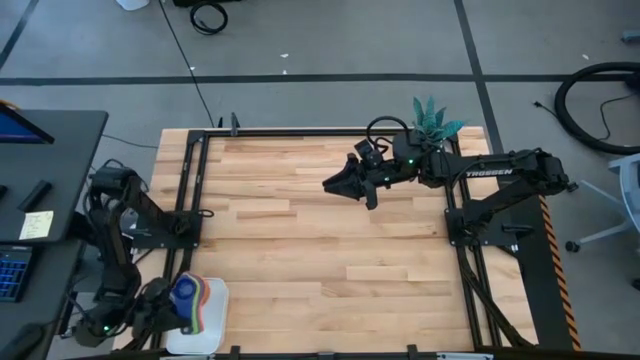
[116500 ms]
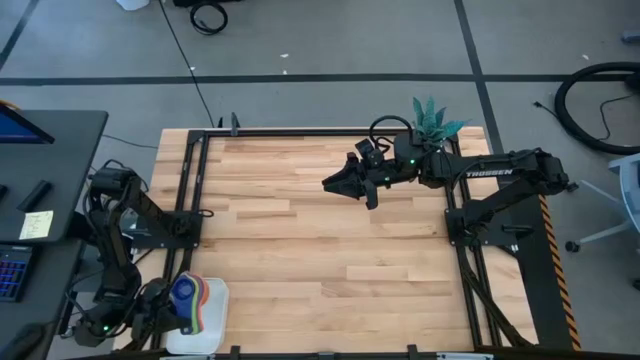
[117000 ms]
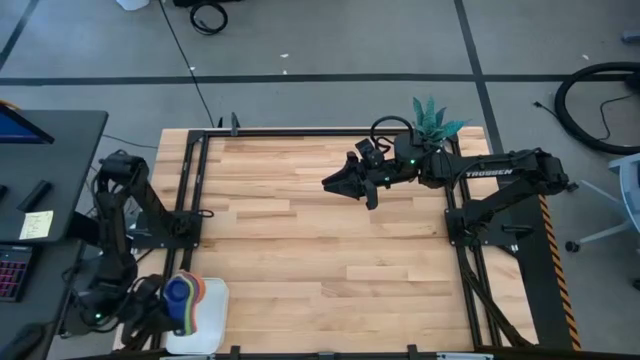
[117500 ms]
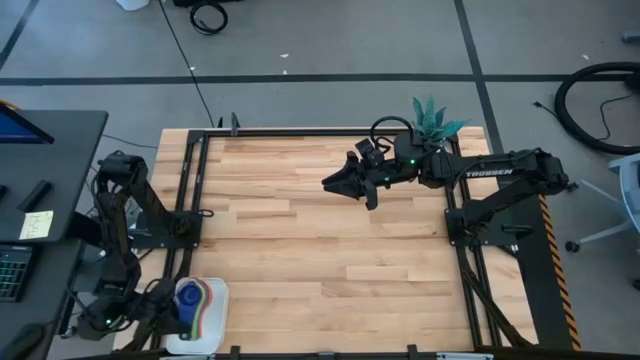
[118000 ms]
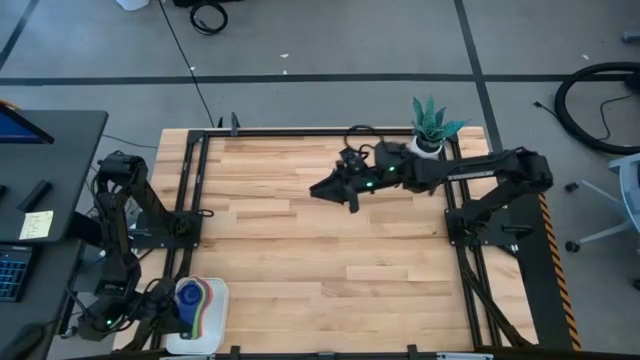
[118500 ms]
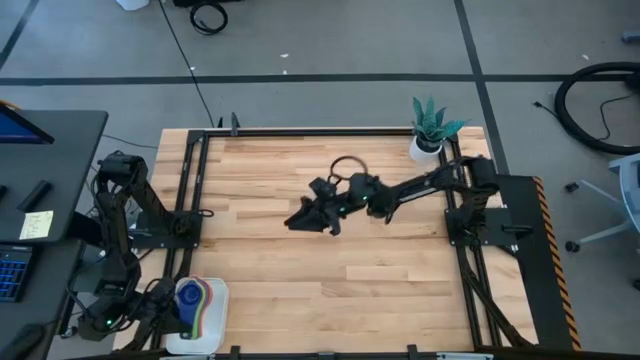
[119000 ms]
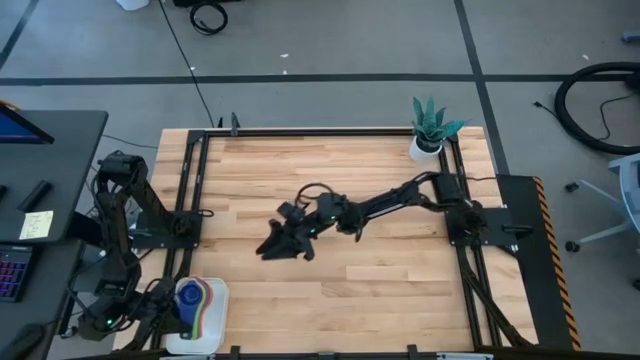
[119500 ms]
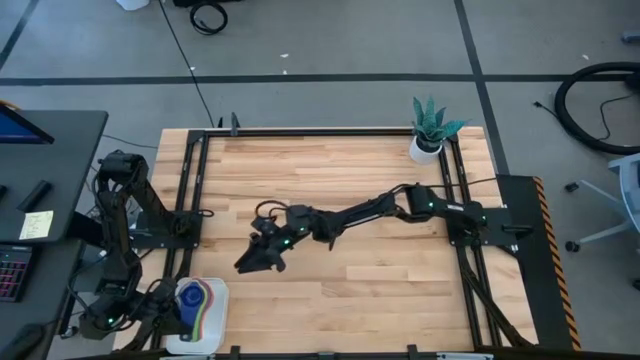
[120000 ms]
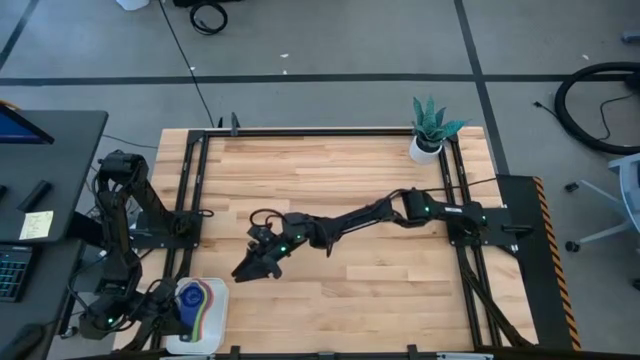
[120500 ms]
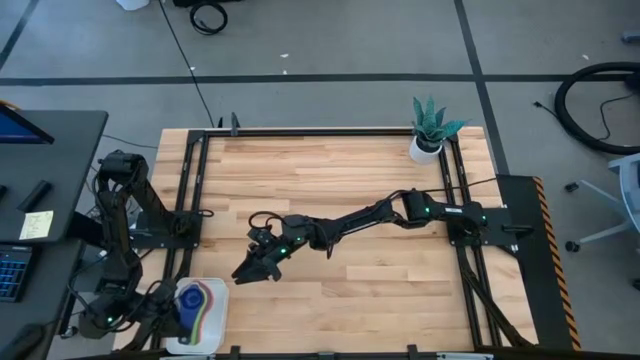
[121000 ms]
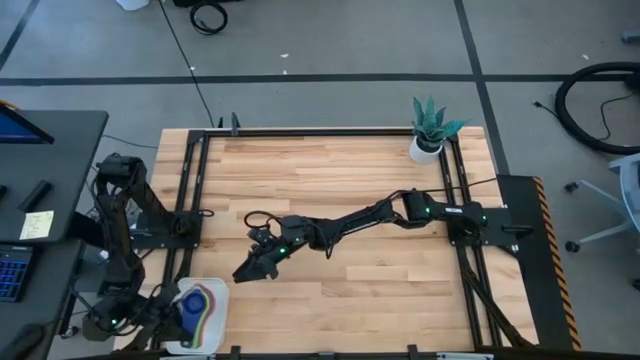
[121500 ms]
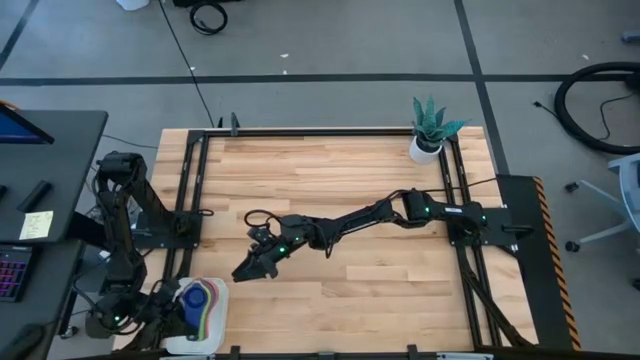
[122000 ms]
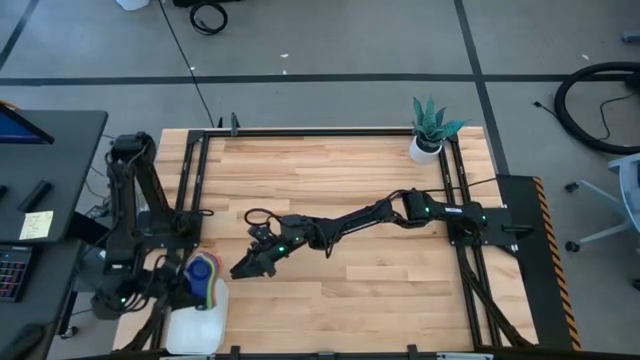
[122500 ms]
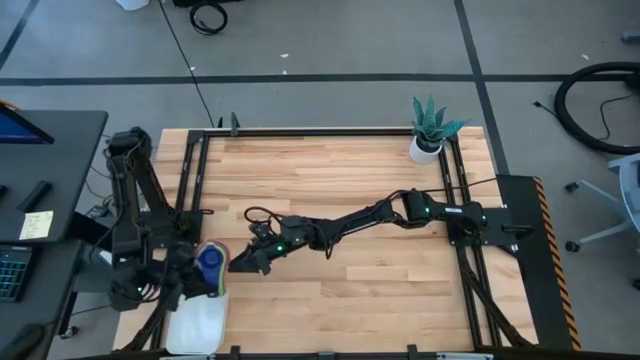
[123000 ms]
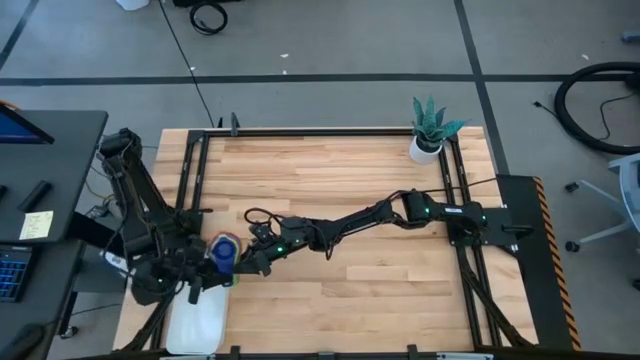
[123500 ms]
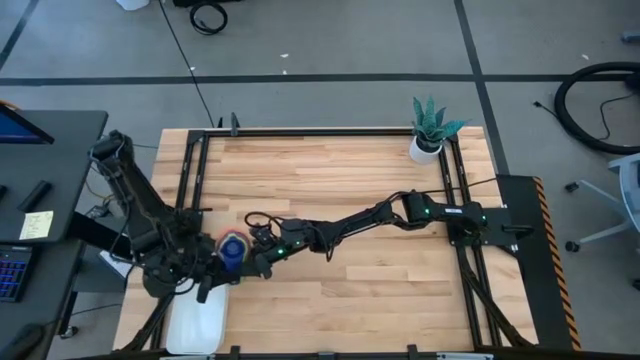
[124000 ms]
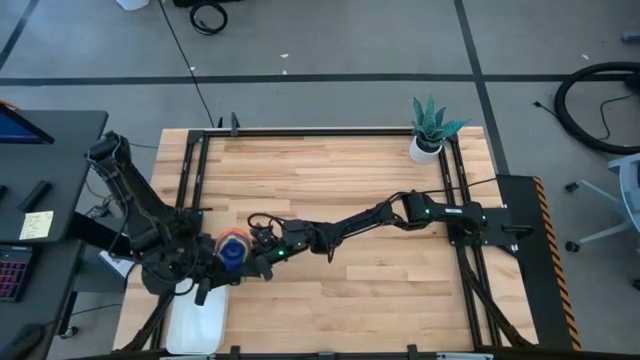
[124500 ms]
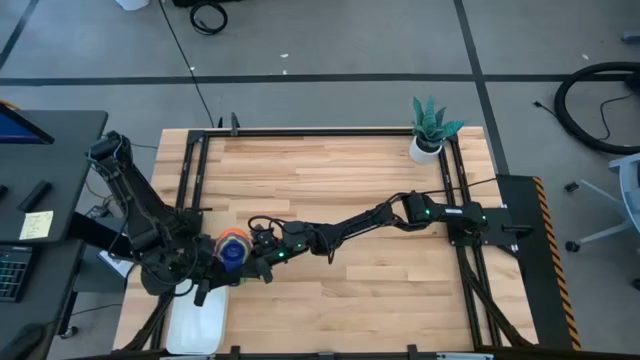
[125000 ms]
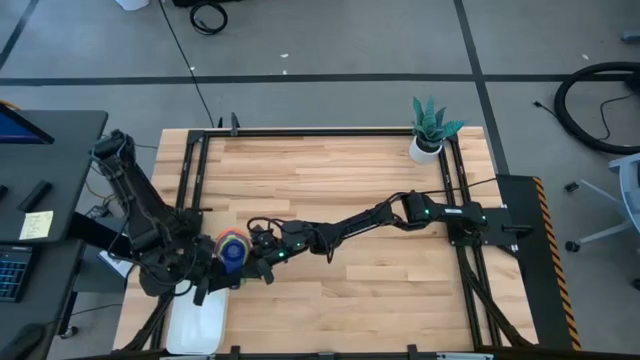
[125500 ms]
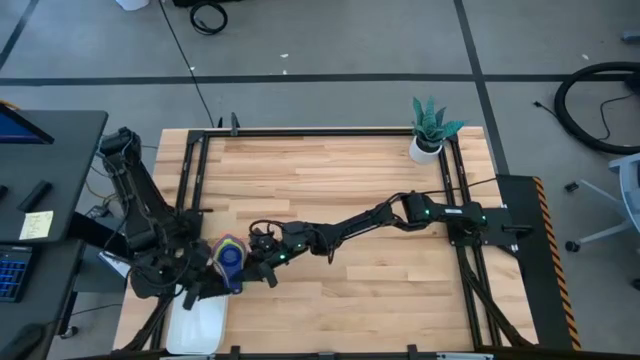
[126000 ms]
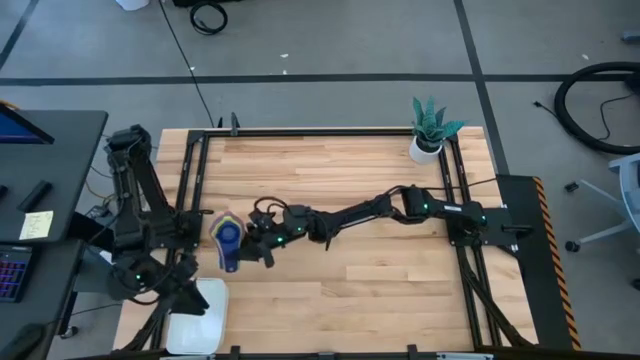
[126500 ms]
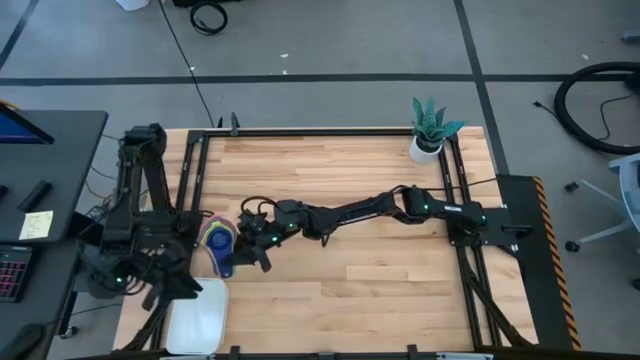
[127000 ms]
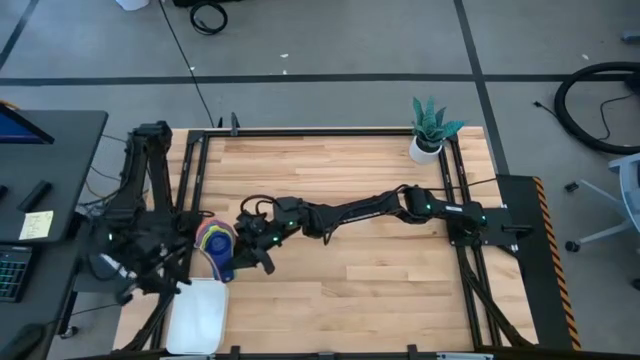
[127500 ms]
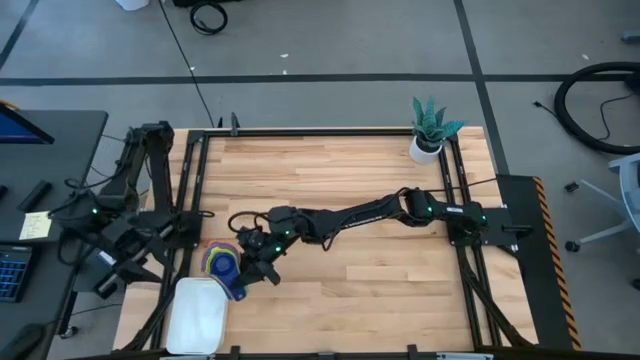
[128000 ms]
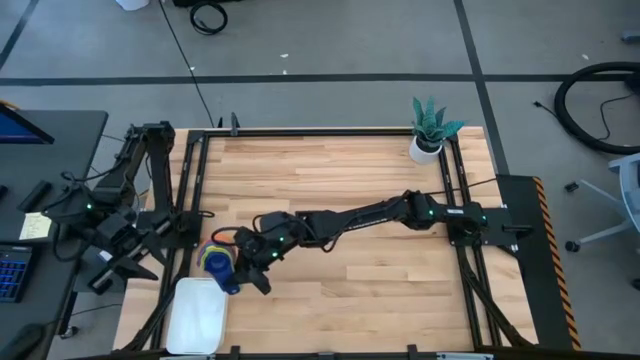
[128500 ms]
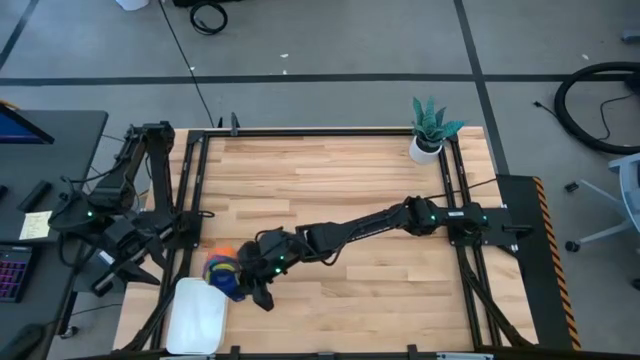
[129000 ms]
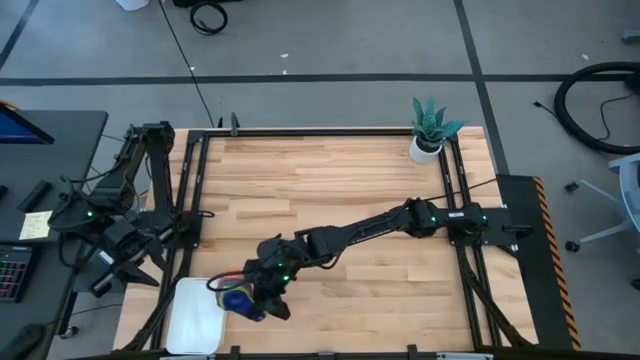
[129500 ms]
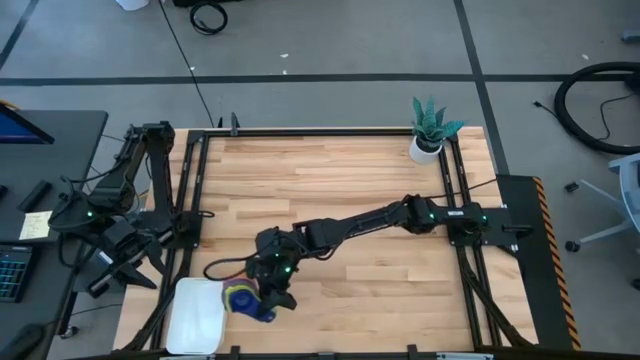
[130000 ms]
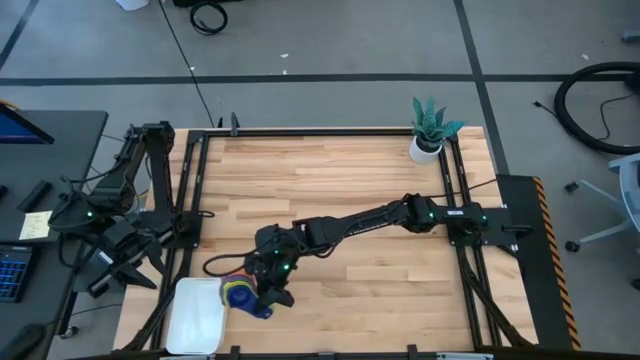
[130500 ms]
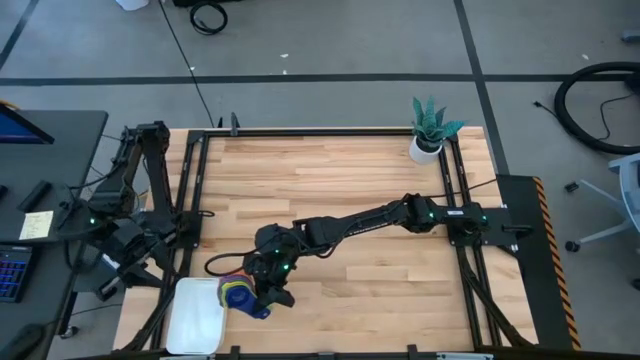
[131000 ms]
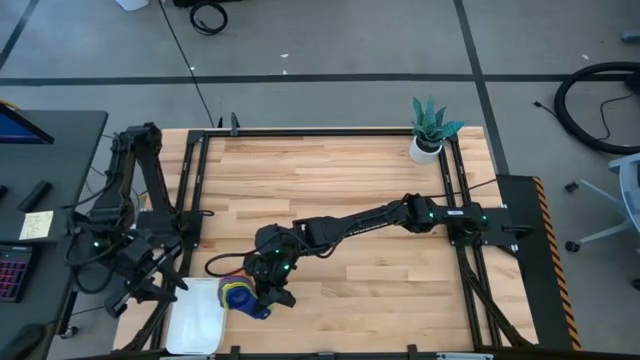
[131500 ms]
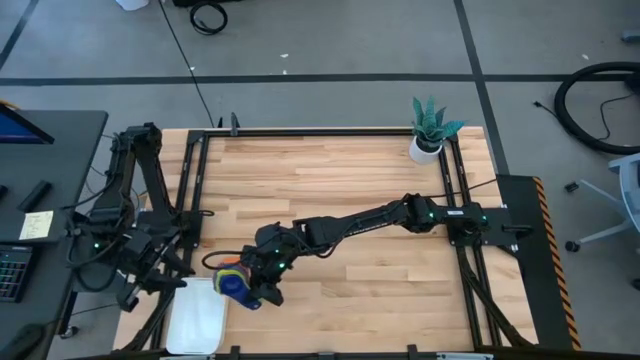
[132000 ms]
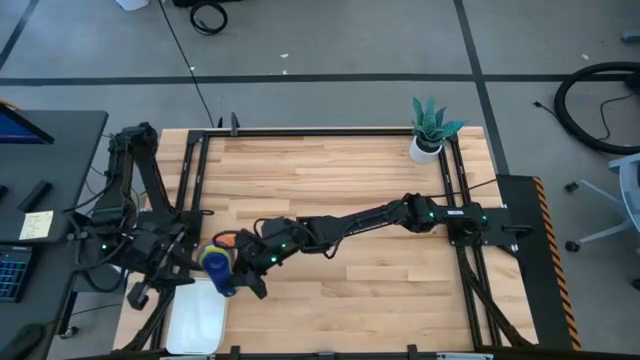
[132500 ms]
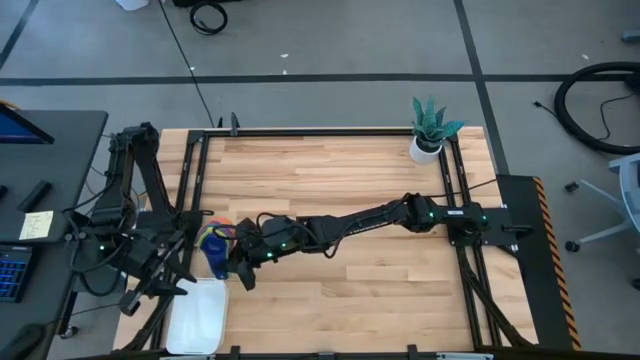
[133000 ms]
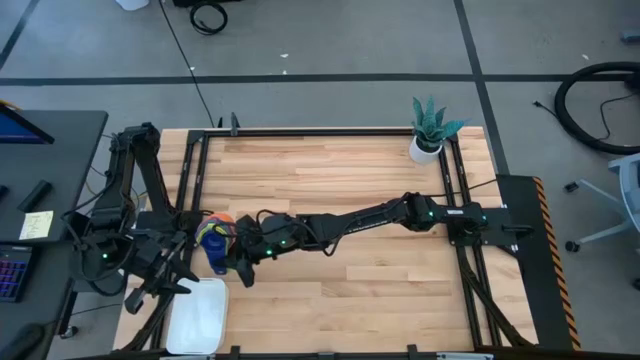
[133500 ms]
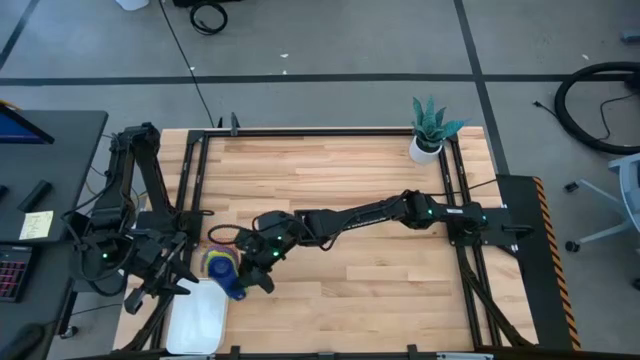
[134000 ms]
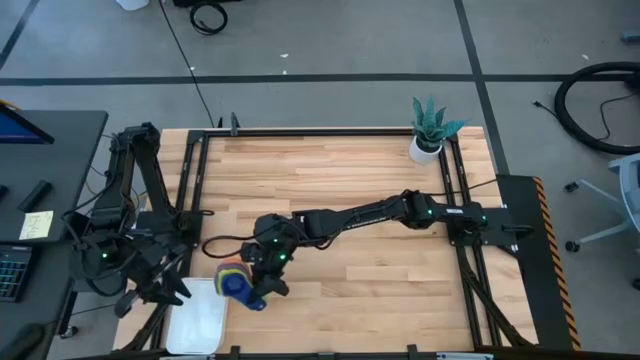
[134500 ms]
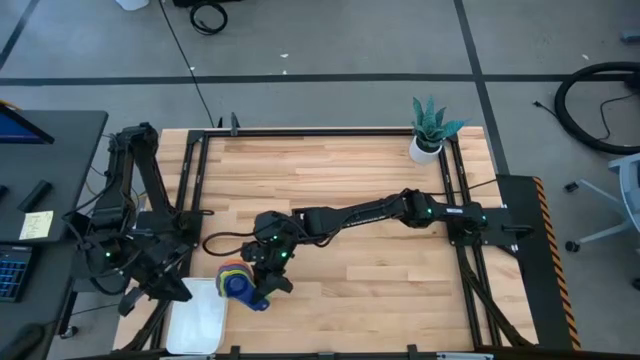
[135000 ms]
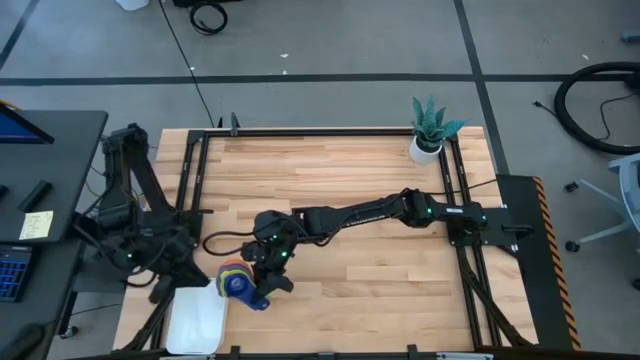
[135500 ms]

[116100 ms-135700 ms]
Task: Nest measuring cups in basket
Put the nested measuring cups into the white bin

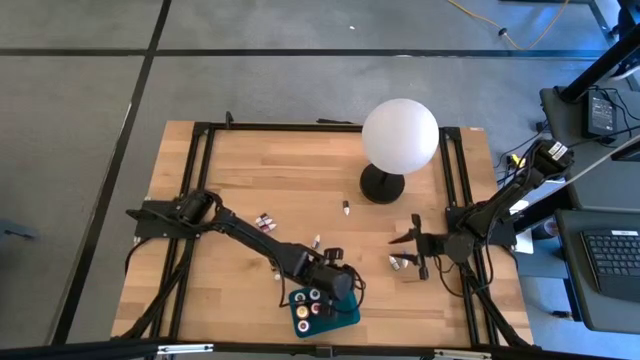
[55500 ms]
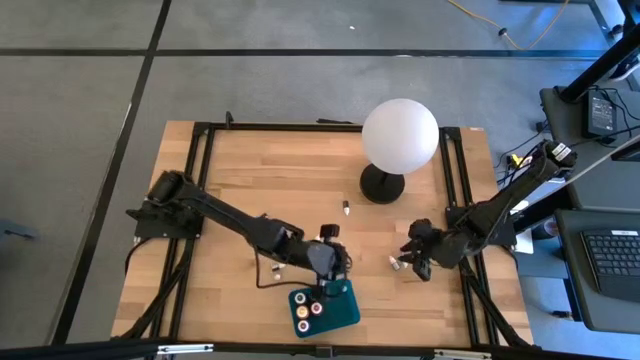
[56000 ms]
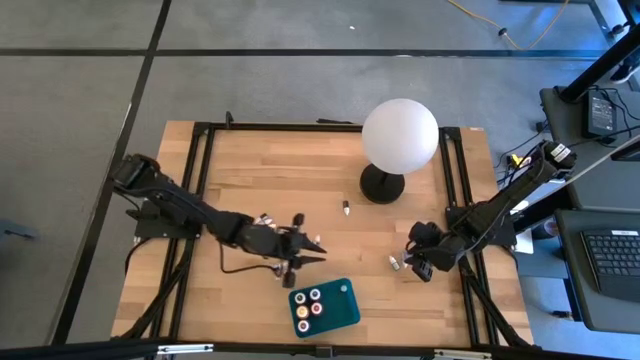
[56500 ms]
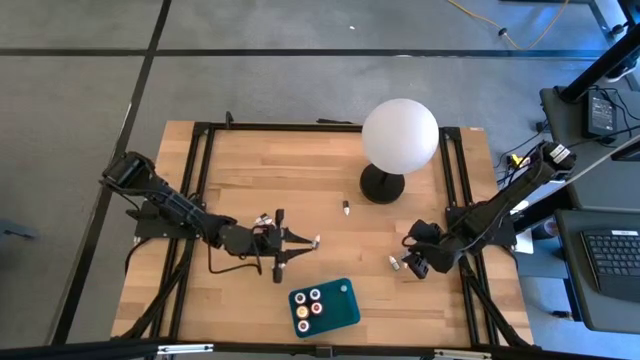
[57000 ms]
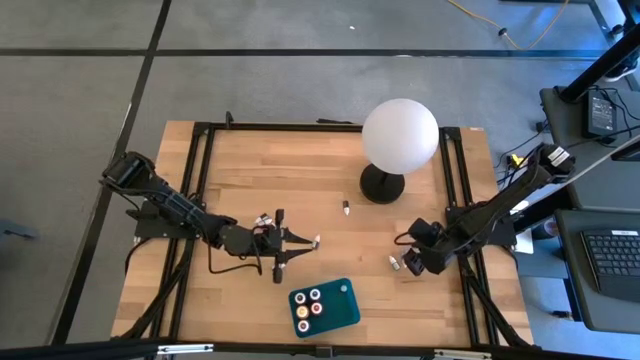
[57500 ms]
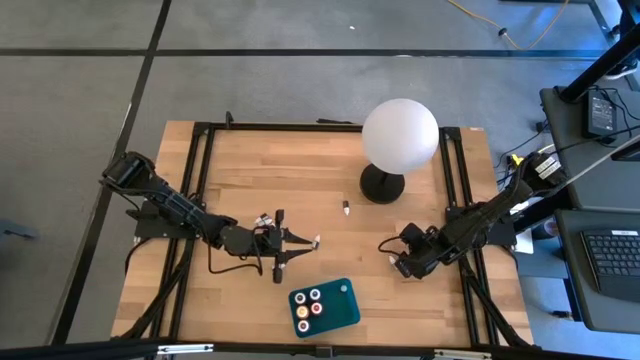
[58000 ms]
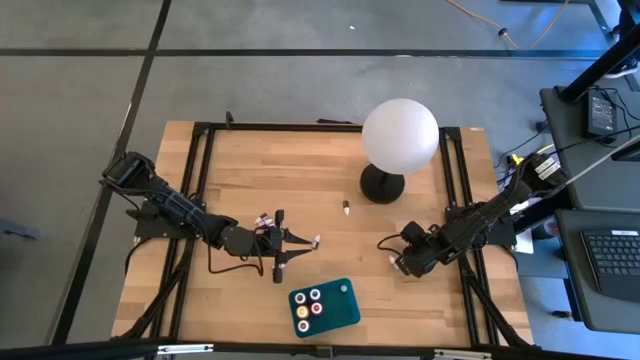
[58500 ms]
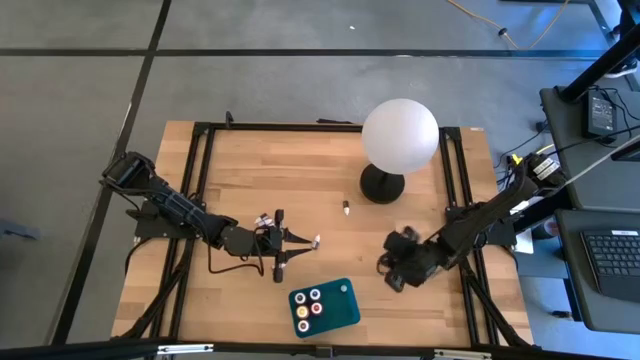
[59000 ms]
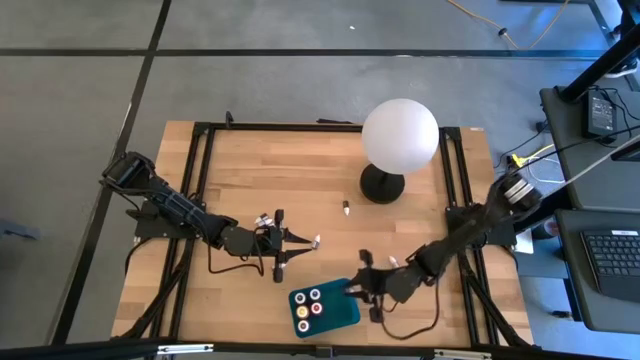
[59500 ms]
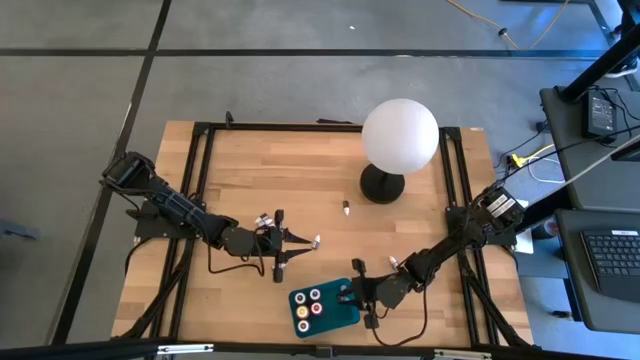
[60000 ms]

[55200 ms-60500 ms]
Task: Pick & Place food coloring
Put the small blue food coloring bottle into the blue bin
